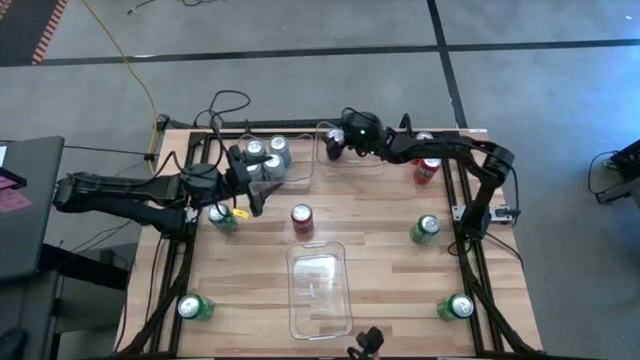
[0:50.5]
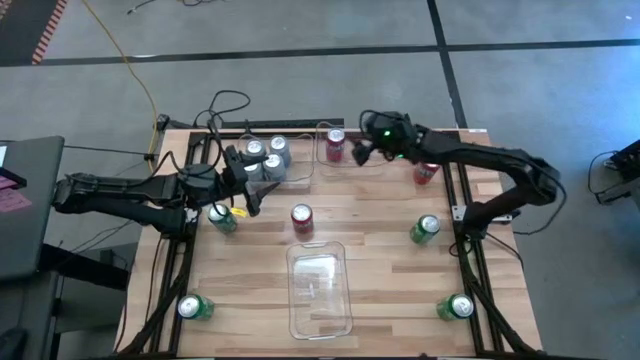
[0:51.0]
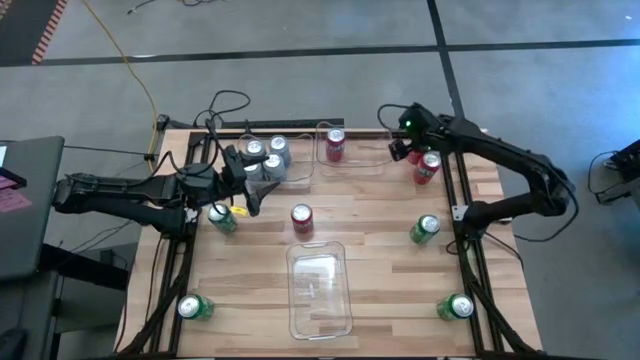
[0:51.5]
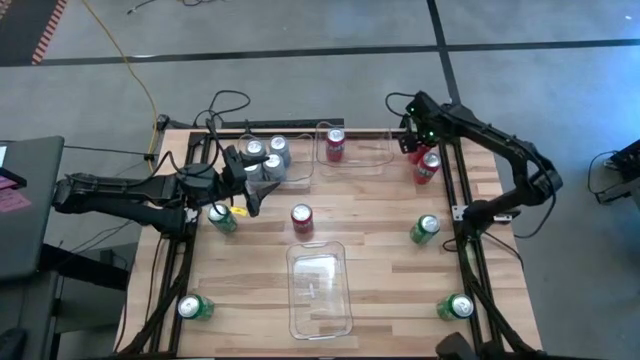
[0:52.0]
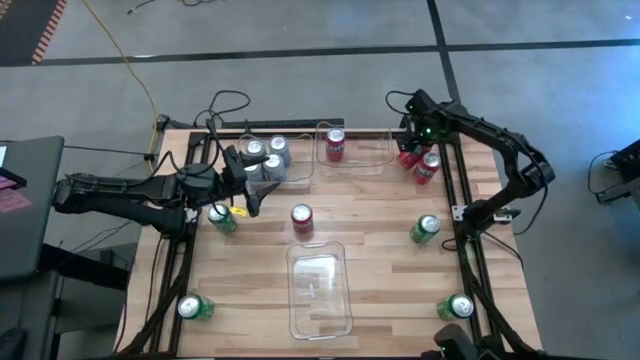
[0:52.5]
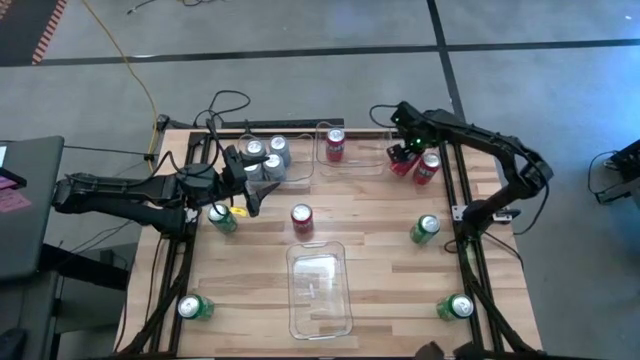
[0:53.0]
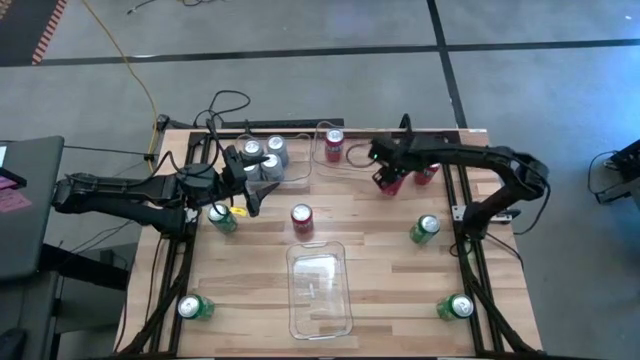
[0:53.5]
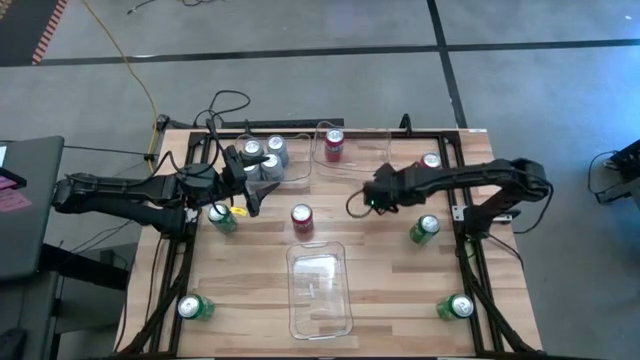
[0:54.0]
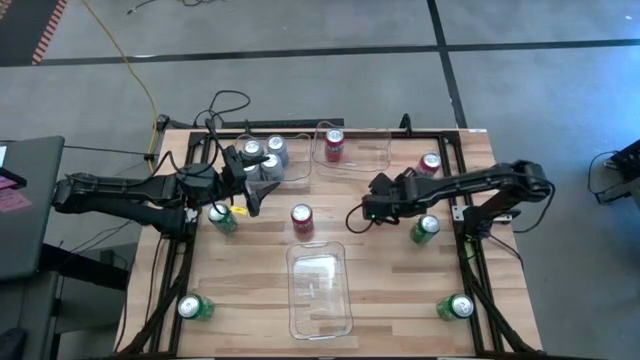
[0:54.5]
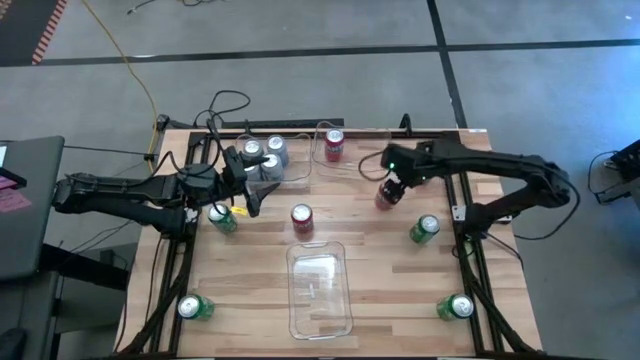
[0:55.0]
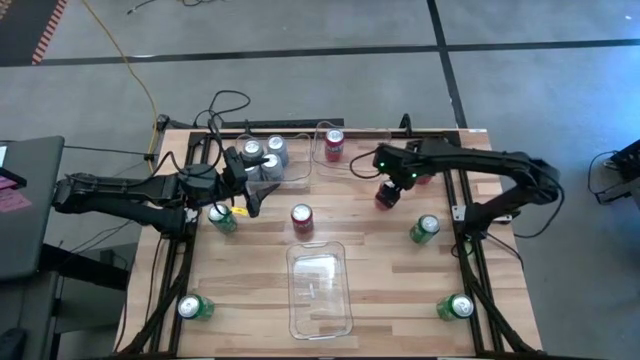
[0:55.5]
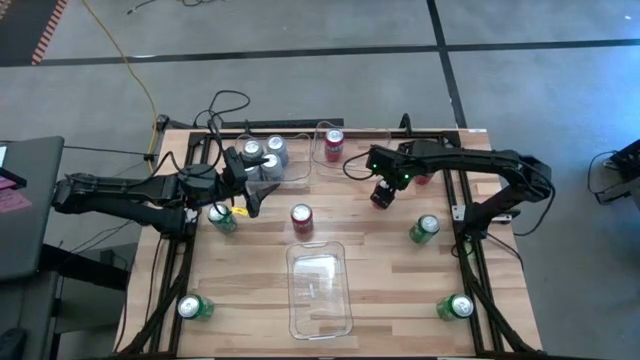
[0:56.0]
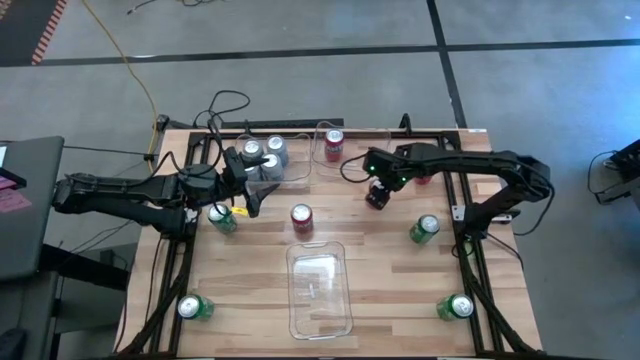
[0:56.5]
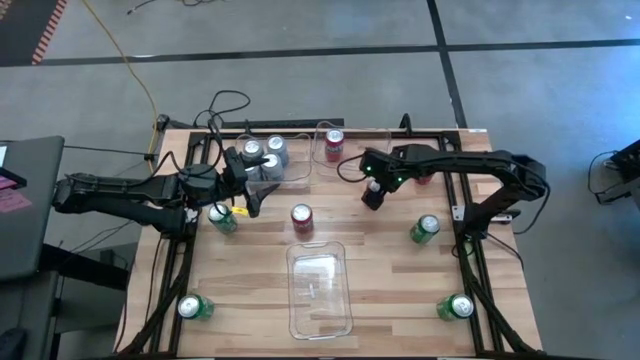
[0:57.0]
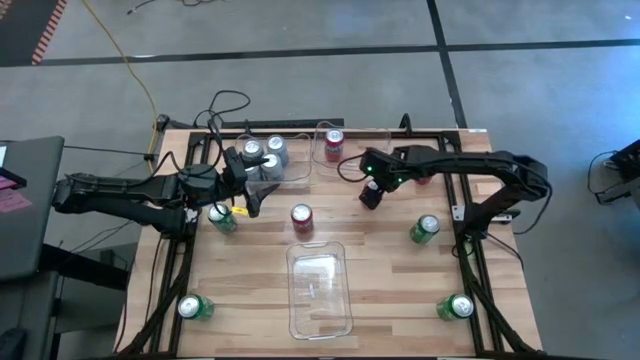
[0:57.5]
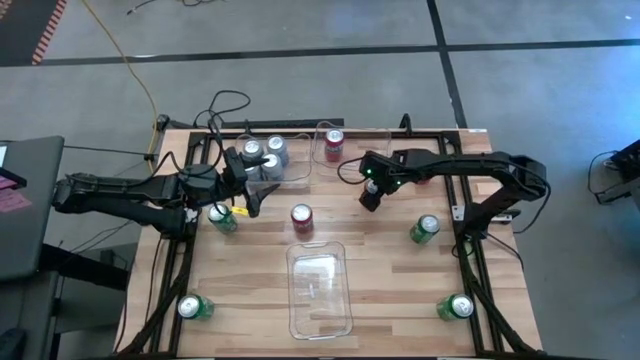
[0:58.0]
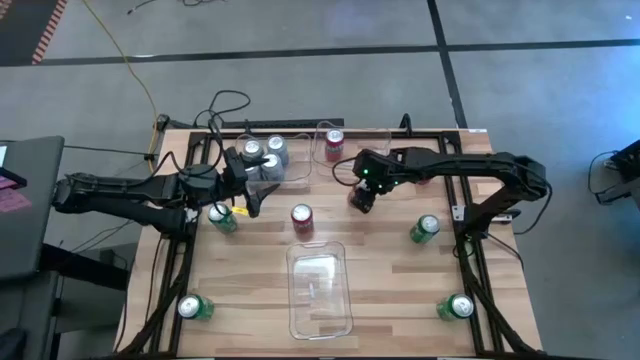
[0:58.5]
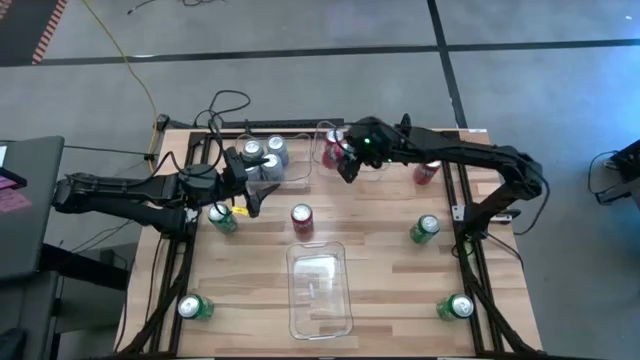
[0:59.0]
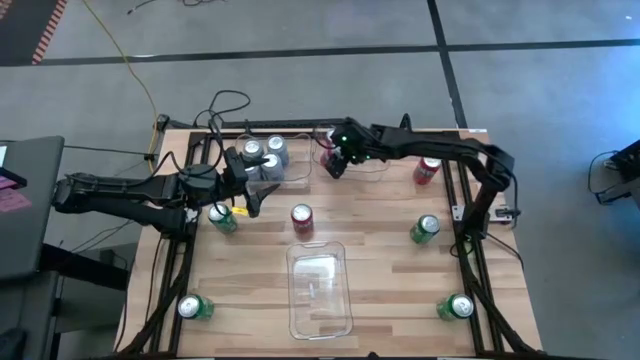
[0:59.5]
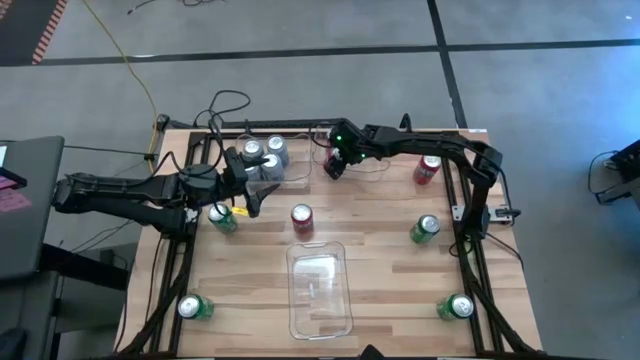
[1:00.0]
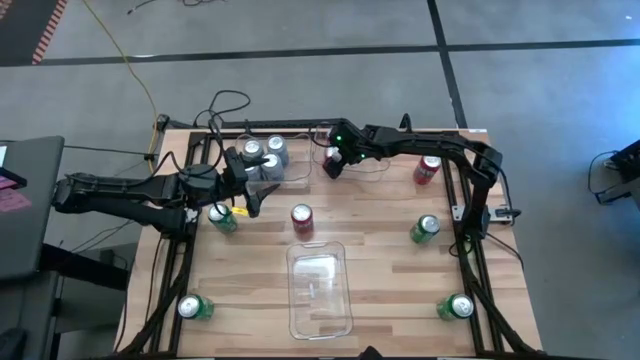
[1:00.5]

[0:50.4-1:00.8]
Task: Sort soda cans
Put the top right red soda can into the top right transparent bin

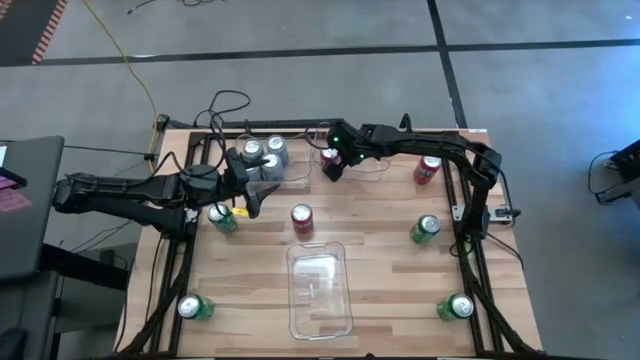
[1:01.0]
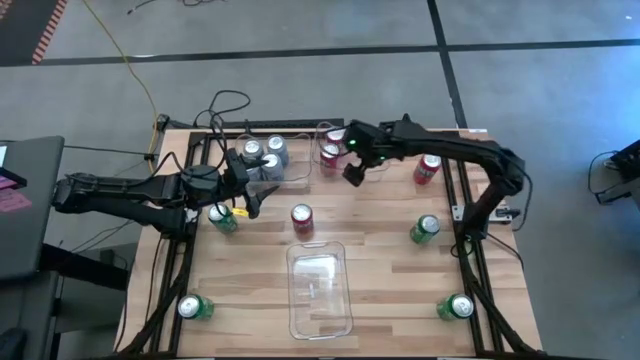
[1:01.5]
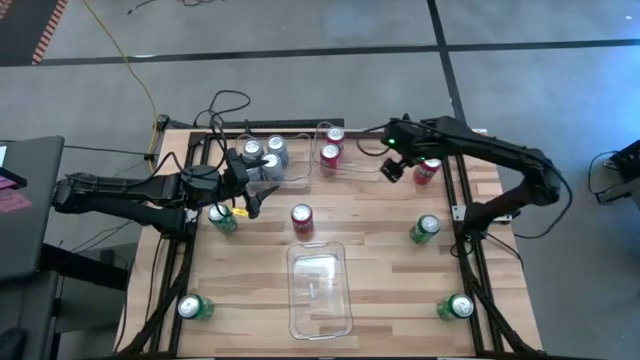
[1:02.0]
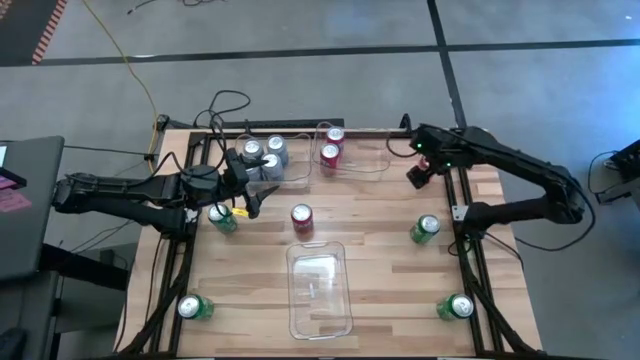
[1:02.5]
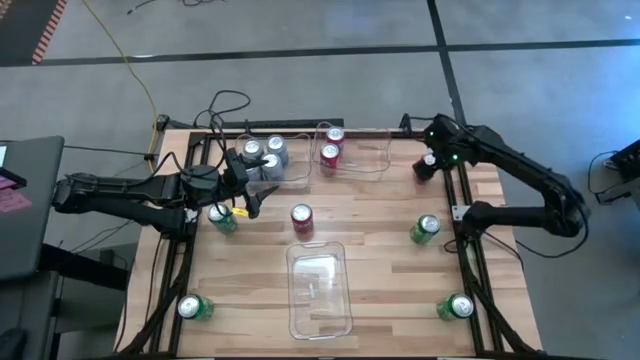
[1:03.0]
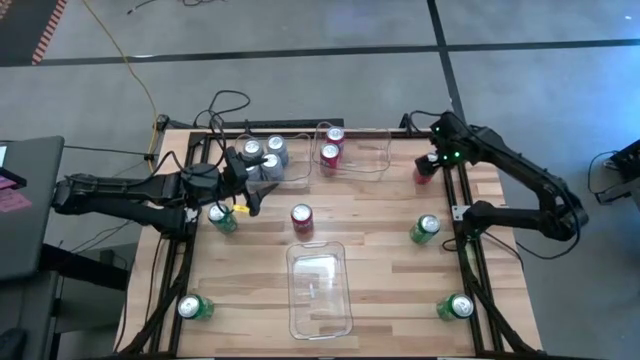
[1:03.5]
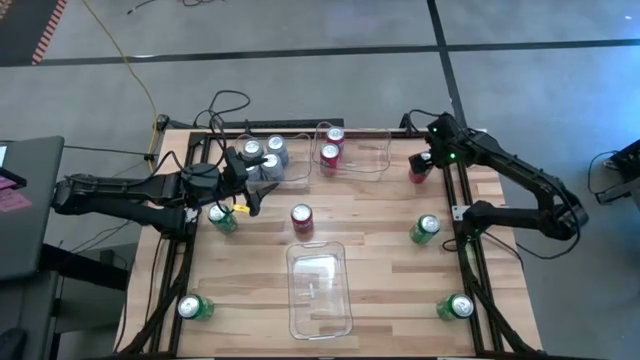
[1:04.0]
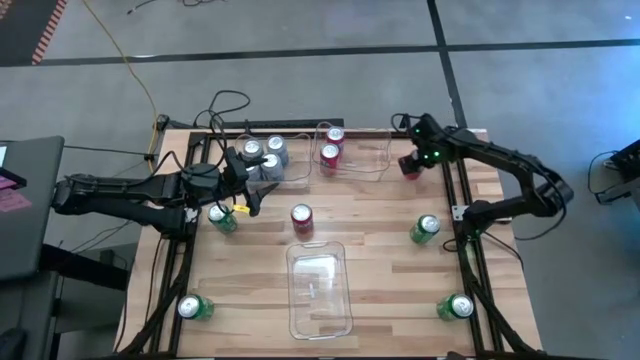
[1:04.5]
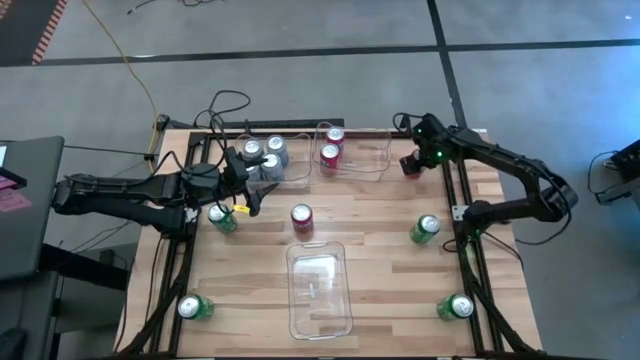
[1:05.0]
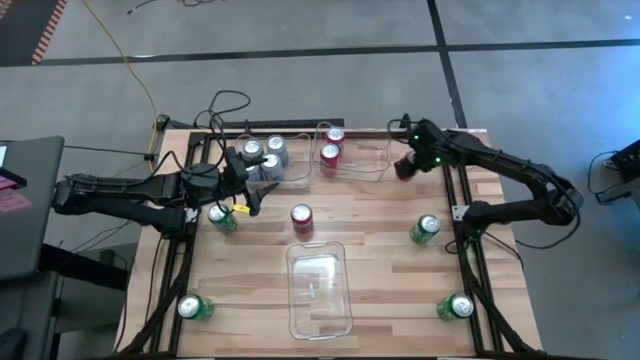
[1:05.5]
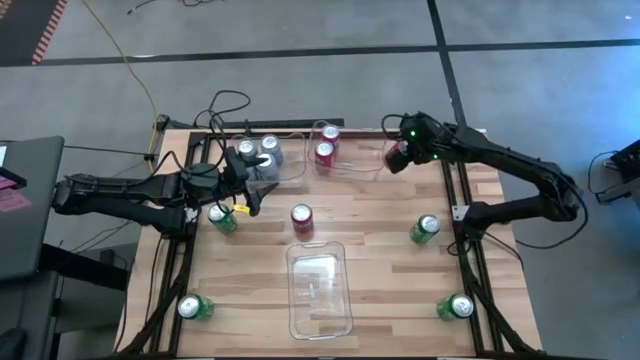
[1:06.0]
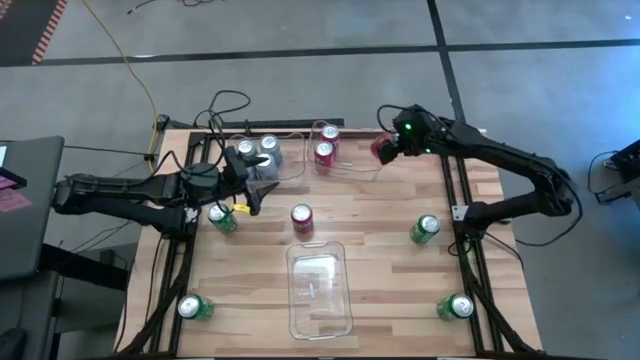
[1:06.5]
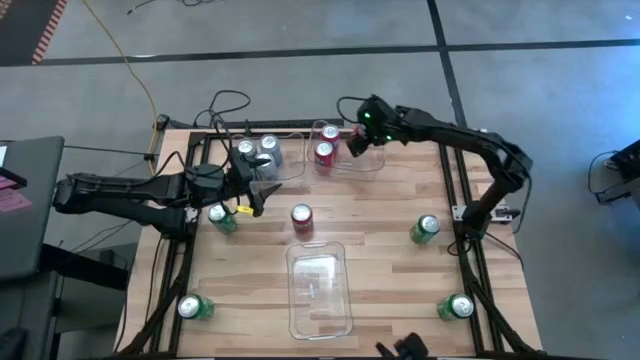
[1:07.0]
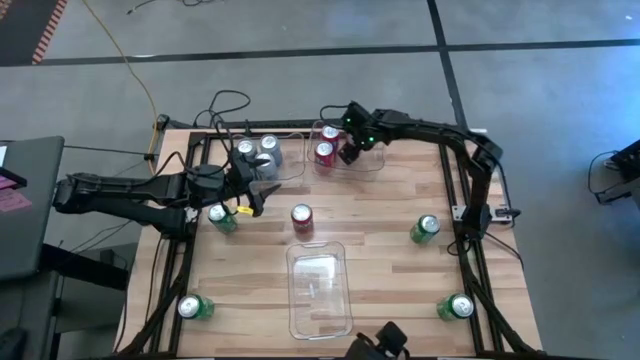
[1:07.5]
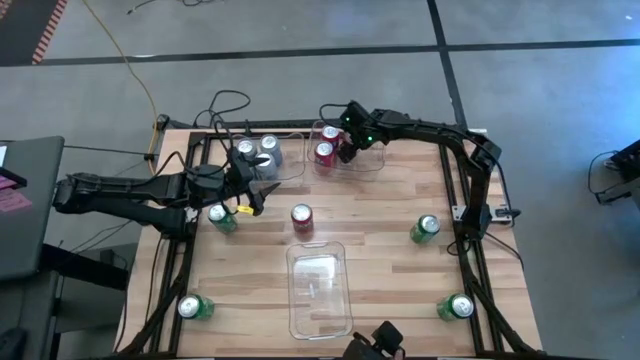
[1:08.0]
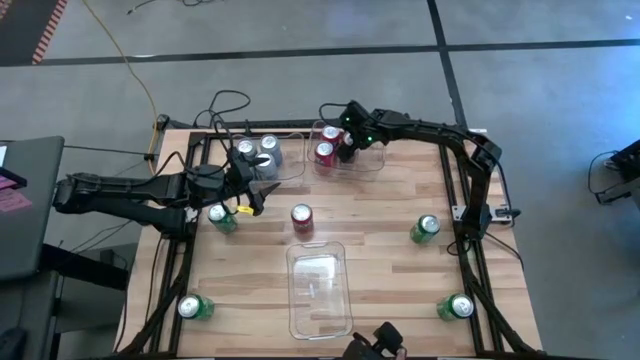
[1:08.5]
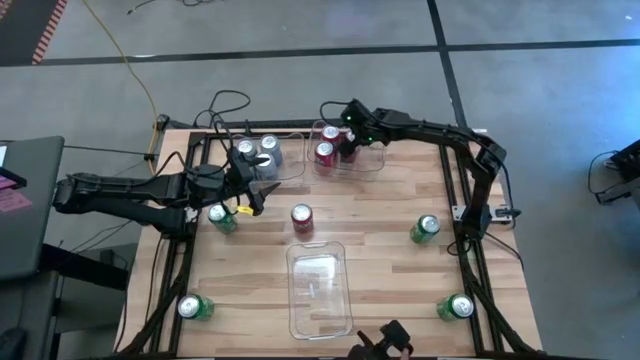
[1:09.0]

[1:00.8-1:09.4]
Put the right red soda can into the top right transparent bin
